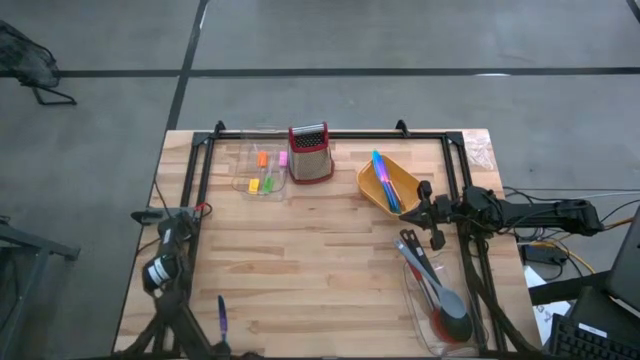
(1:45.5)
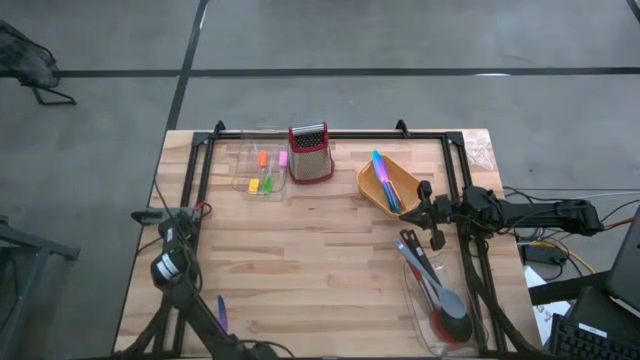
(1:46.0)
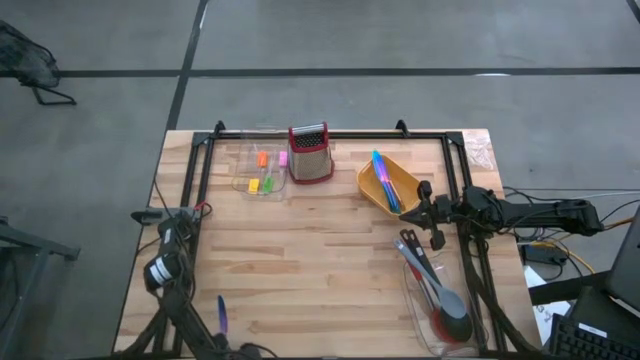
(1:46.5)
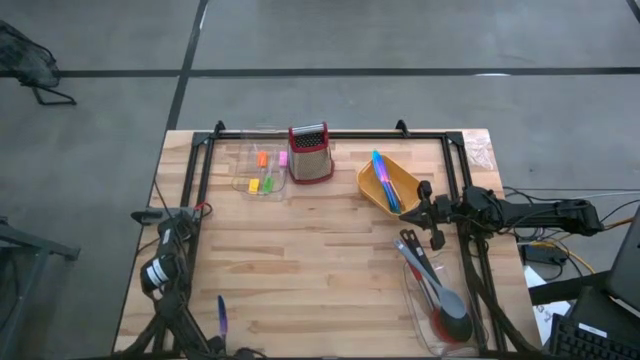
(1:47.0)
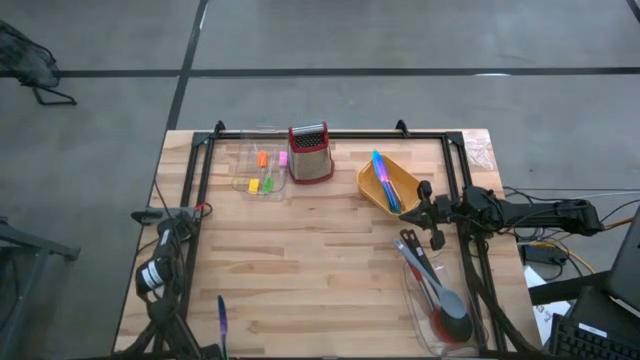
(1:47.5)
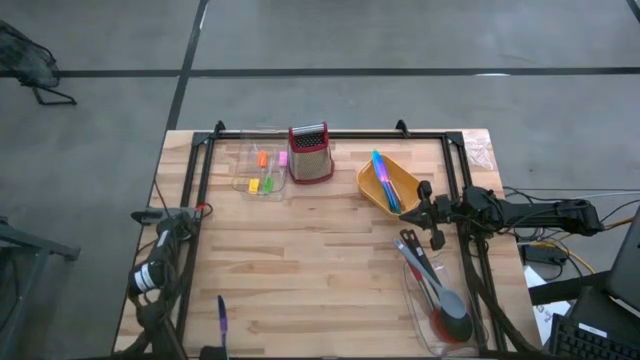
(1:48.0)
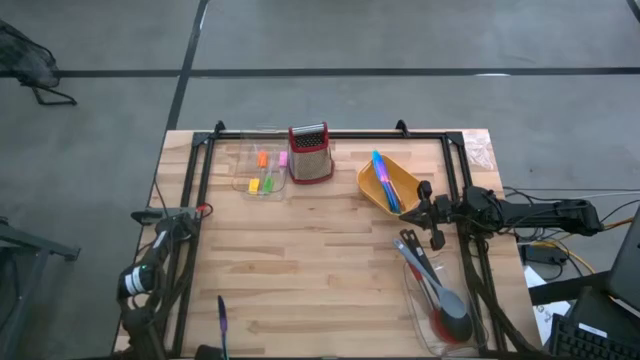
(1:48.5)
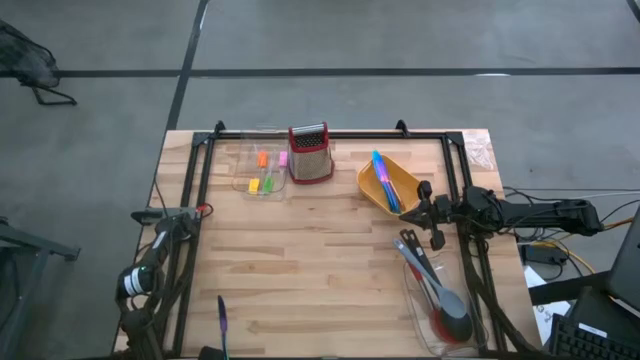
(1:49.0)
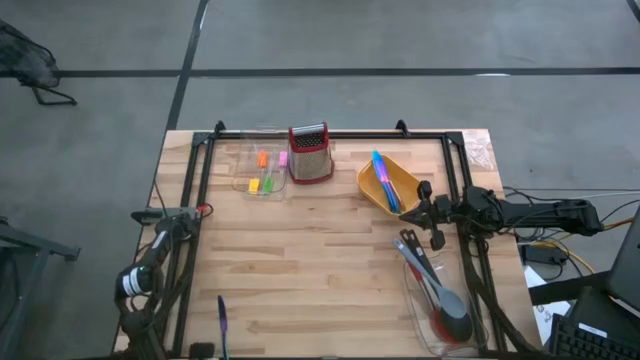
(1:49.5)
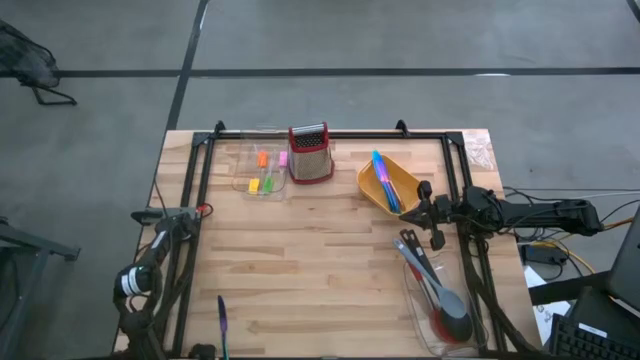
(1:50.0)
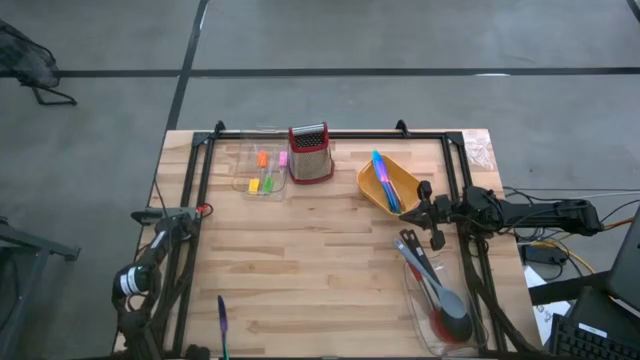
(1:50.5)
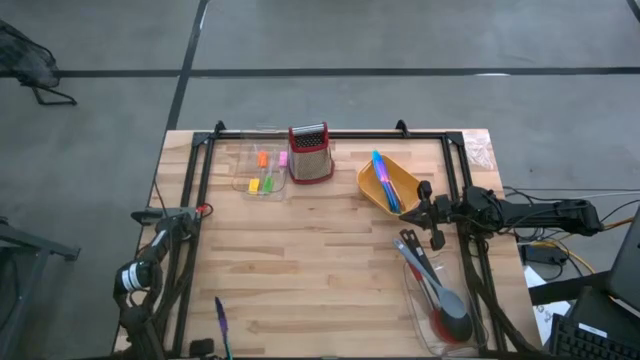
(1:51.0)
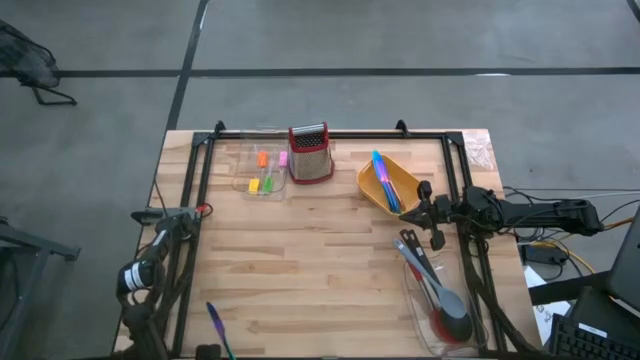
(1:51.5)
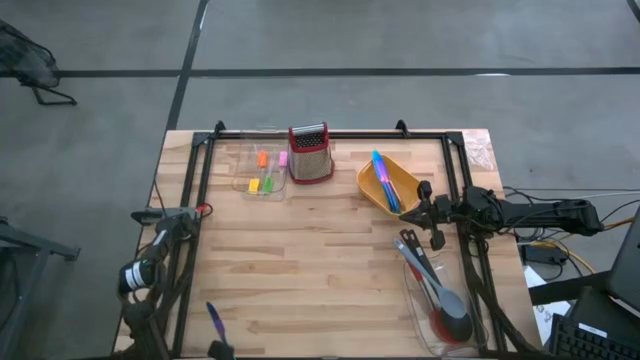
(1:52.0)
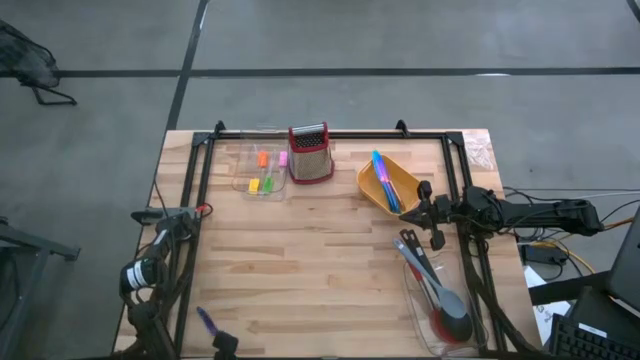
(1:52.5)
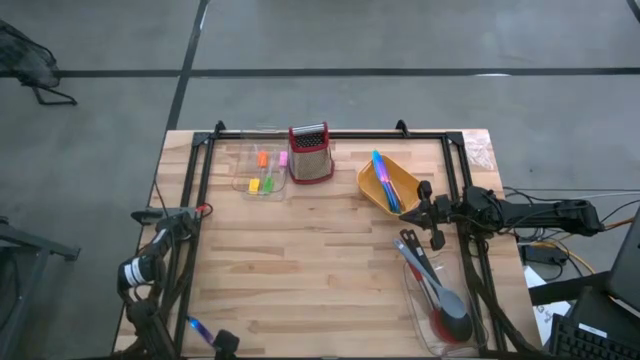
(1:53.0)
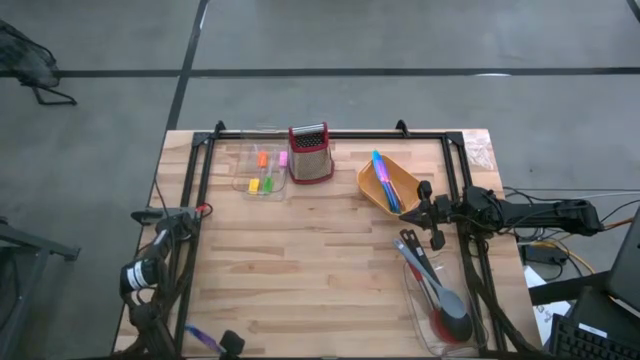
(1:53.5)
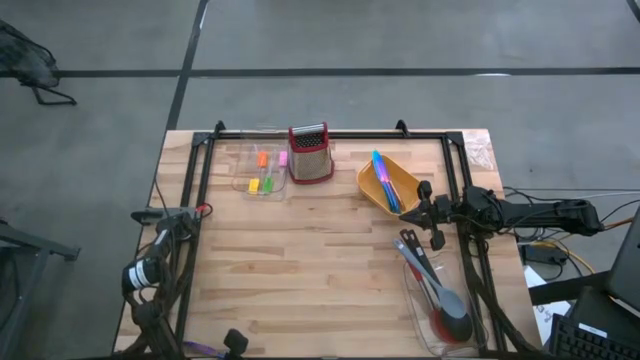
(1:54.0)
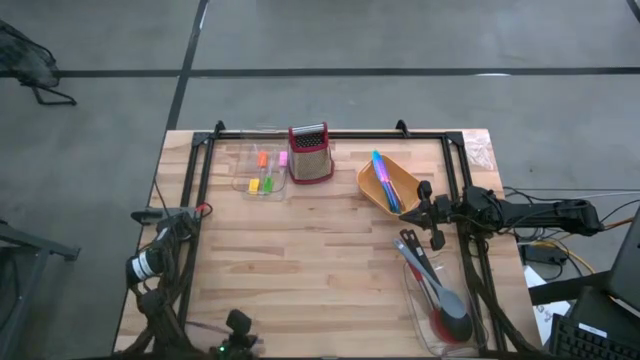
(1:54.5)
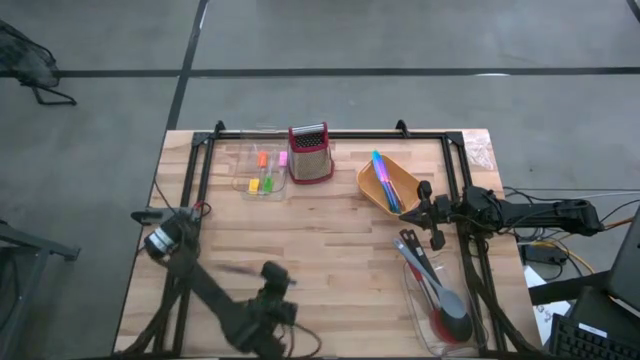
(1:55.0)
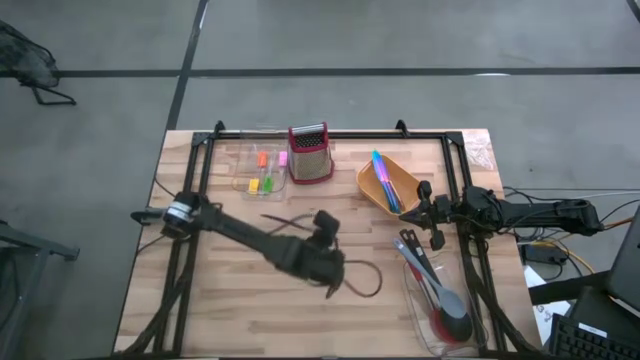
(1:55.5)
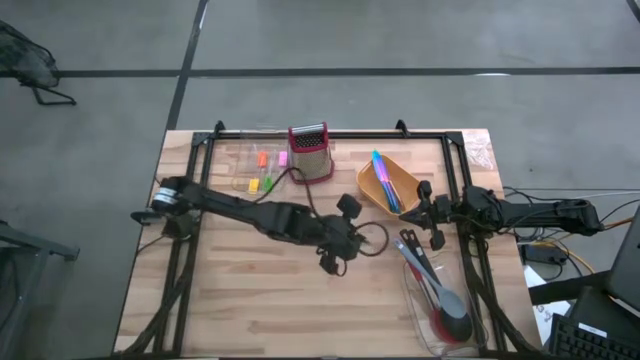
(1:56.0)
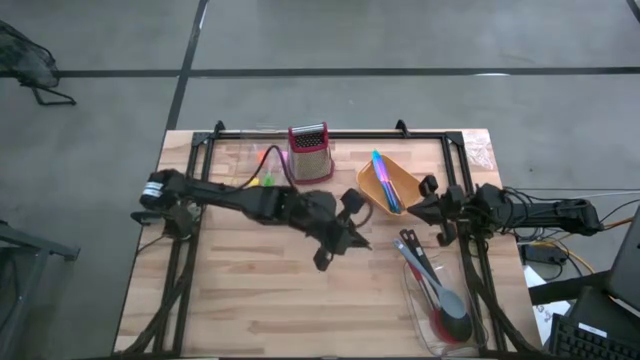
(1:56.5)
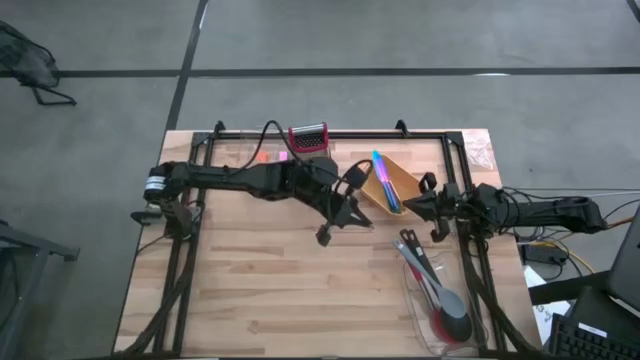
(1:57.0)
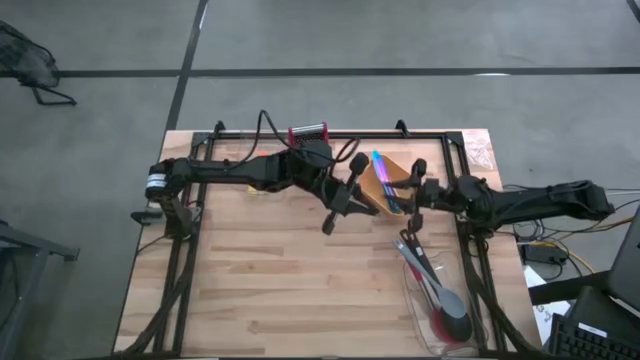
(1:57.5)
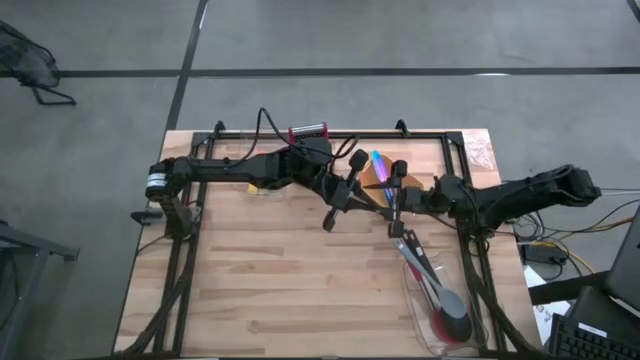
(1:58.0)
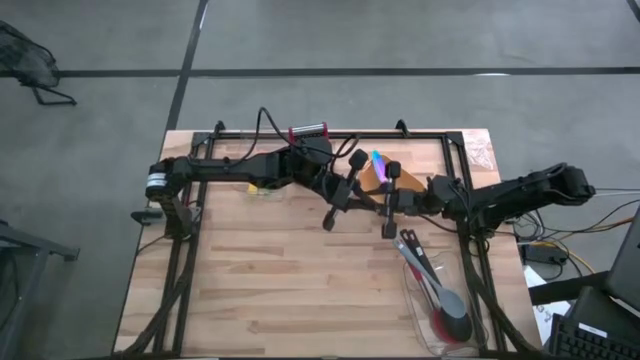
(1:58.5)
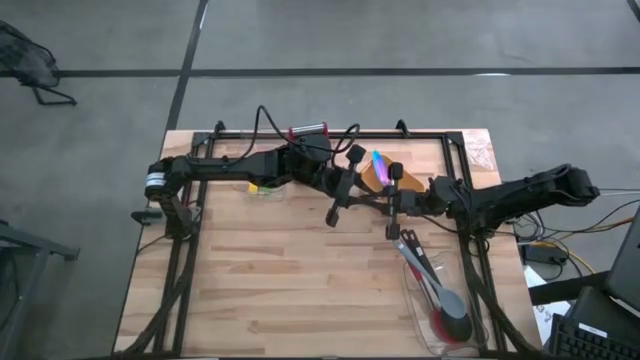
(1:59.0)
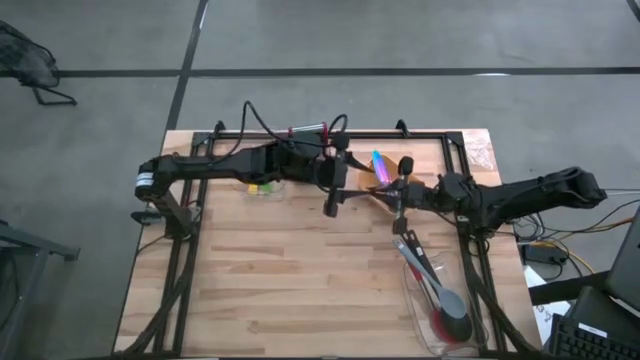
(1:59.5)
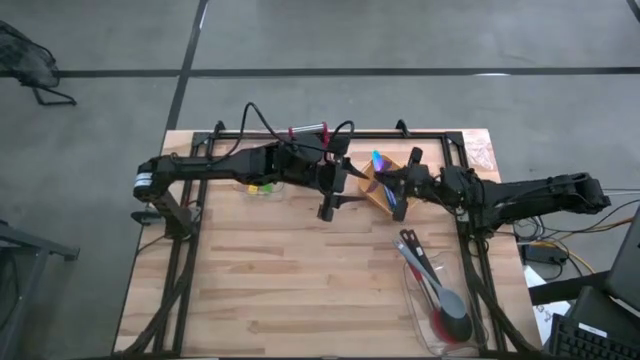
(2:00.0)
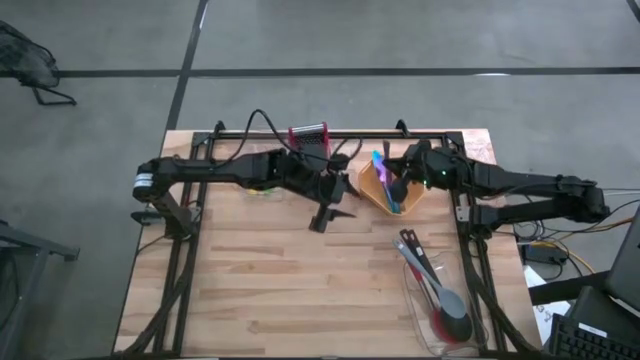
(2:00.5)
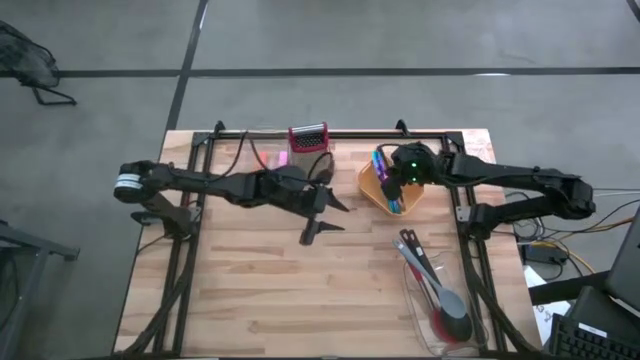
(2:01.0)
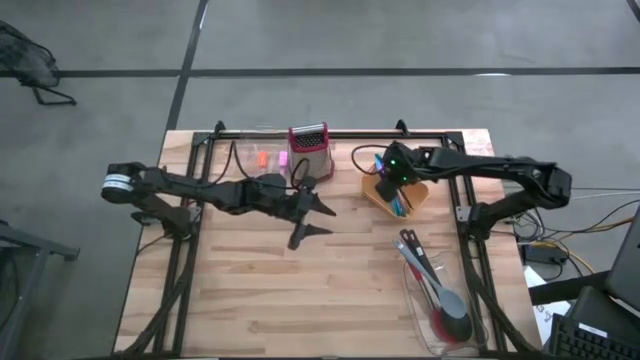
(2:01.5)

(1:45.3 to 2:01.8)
Task: Pick & Place Kitchen Items
Put the blue table knife into the orange bin

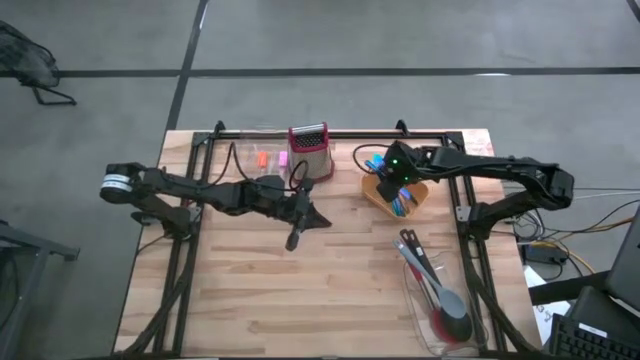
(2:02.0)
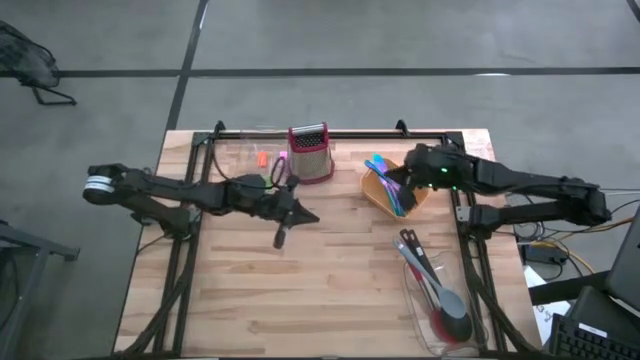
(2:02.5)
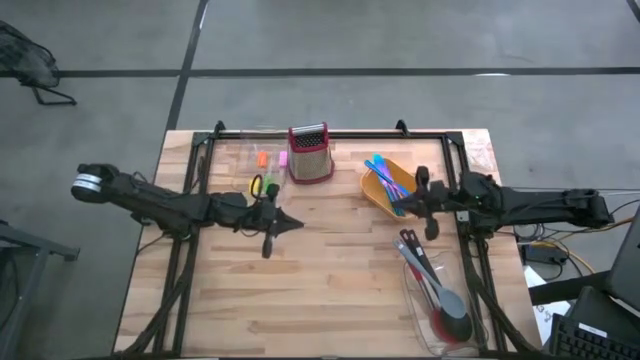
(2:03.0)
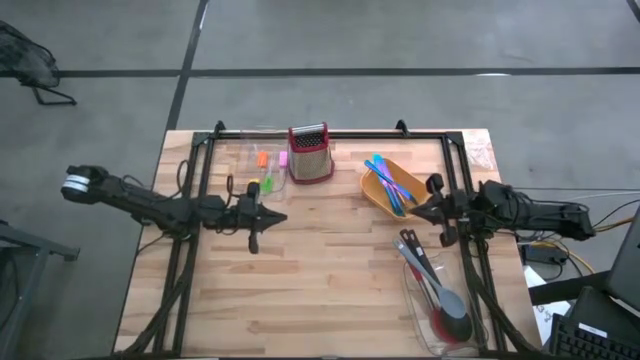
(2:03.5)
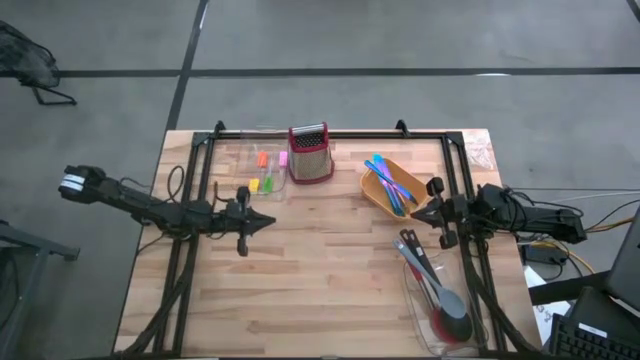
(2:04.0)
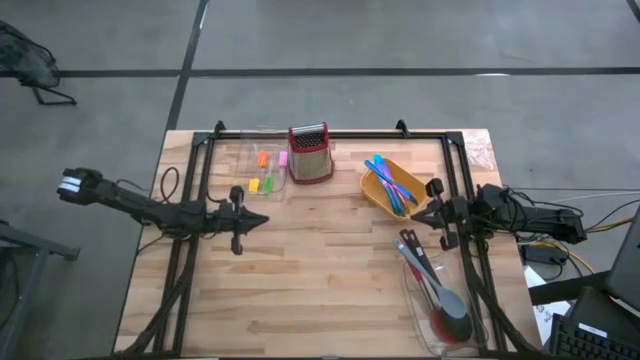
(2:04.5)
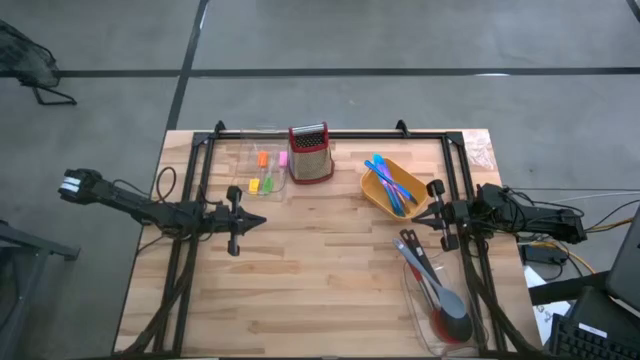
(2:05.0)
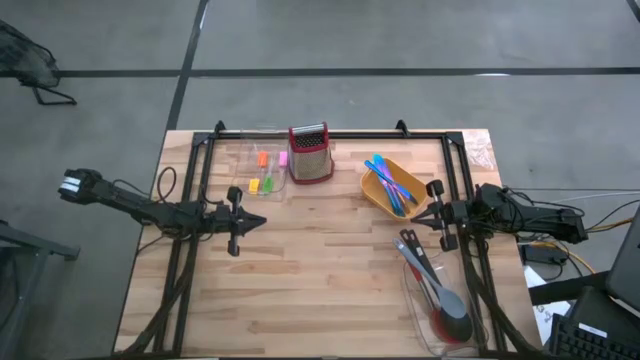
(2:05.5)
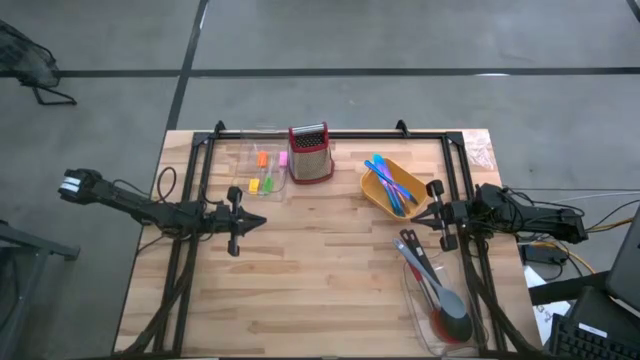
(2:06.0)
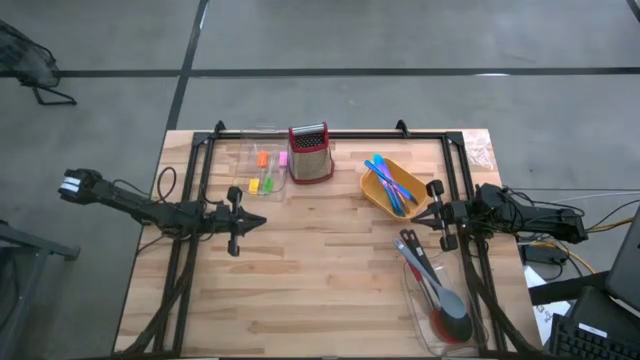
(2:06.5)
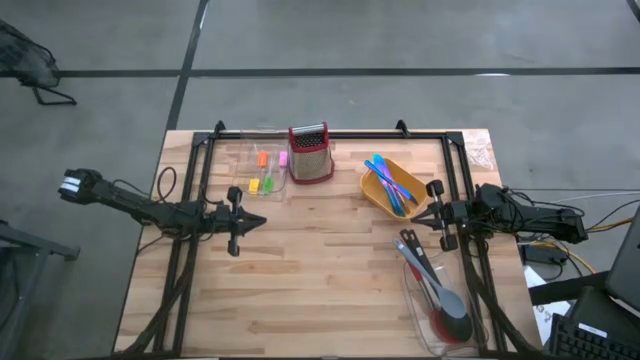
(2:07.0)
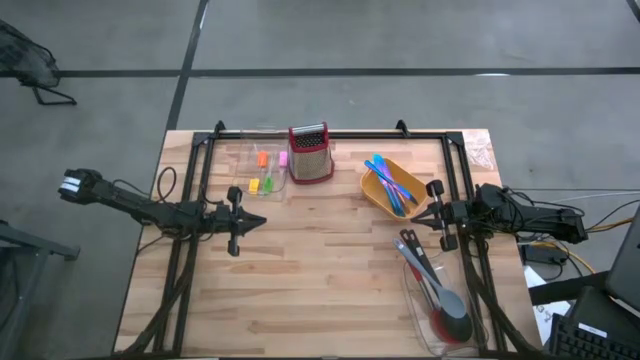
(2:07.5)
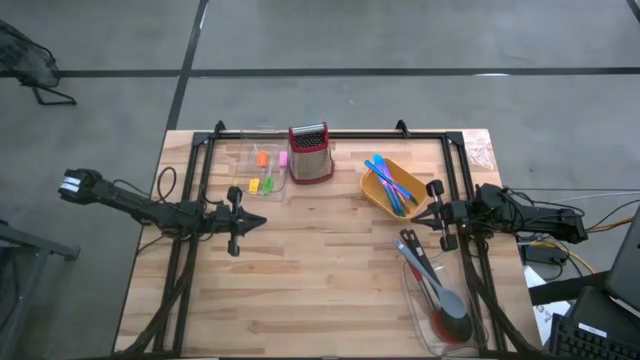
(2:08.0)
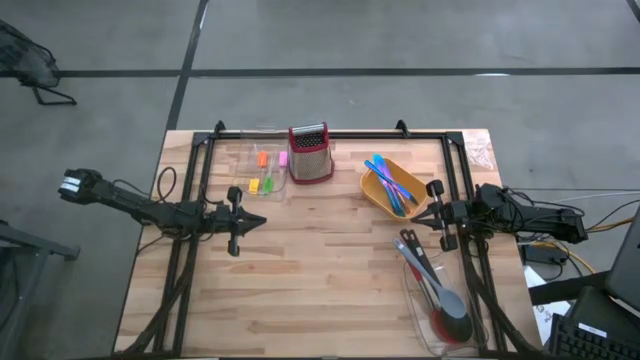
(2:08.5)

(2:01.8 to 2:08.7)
Return to Home Position
